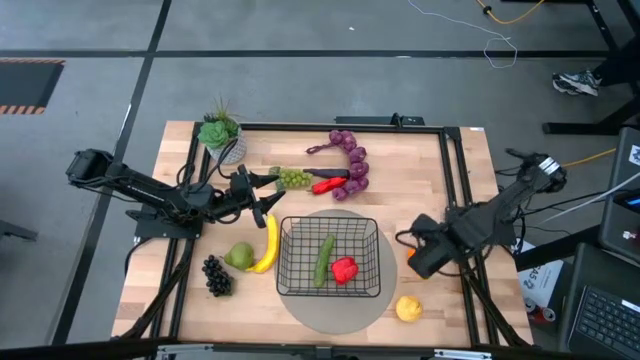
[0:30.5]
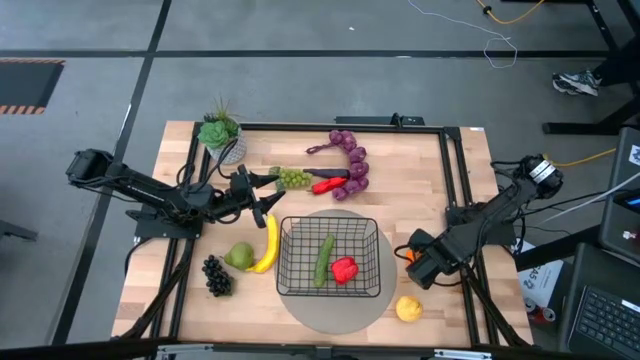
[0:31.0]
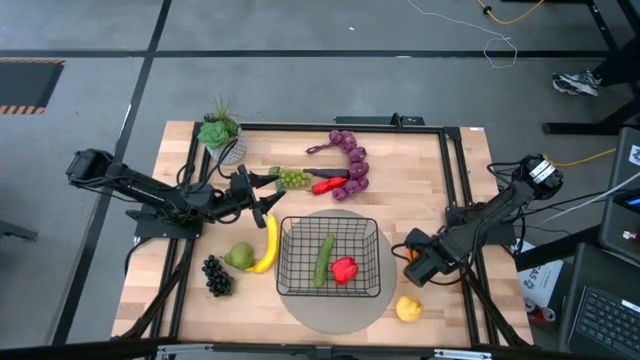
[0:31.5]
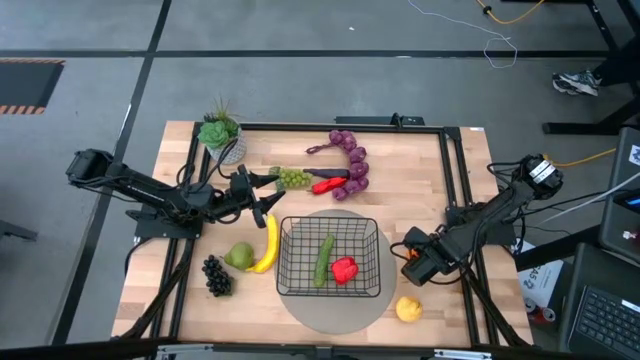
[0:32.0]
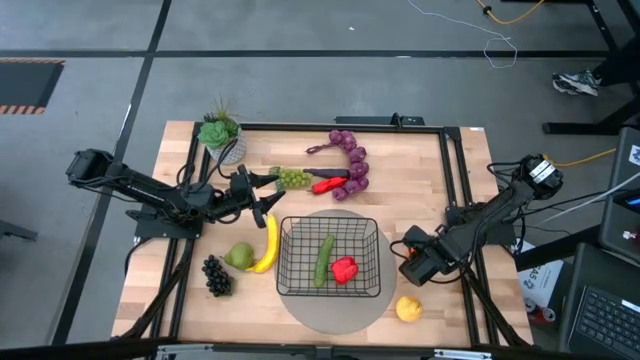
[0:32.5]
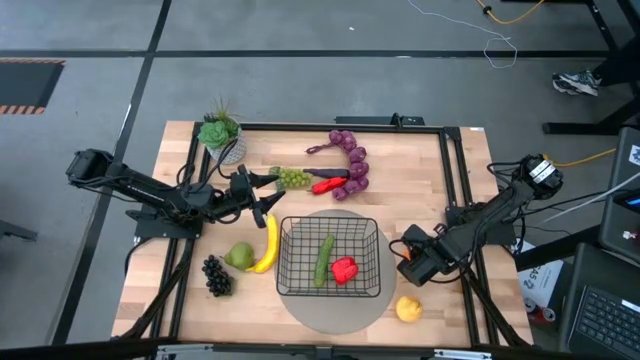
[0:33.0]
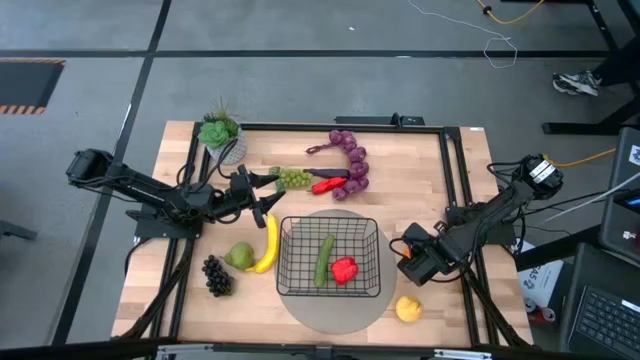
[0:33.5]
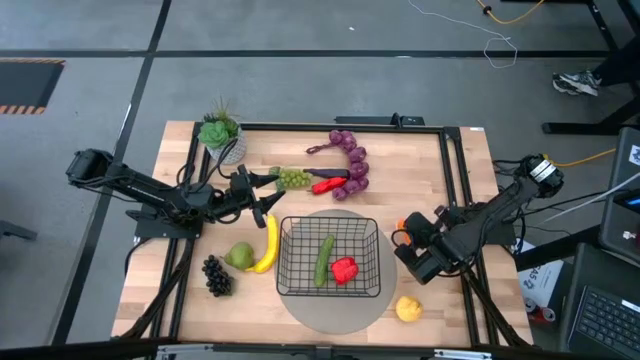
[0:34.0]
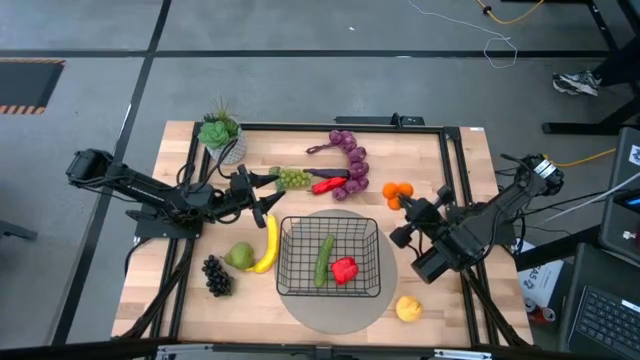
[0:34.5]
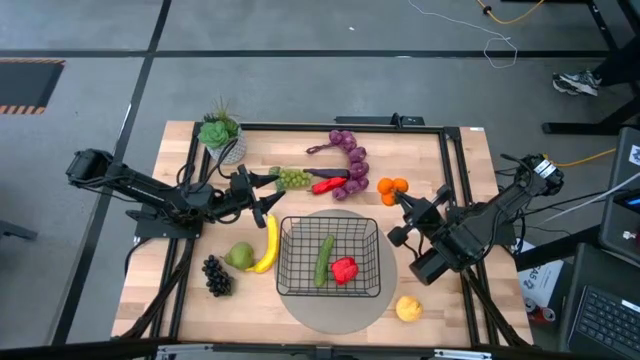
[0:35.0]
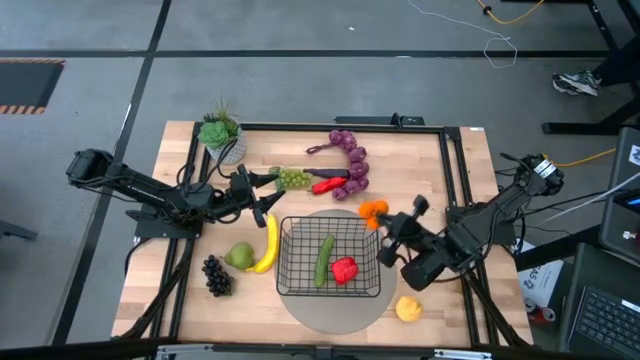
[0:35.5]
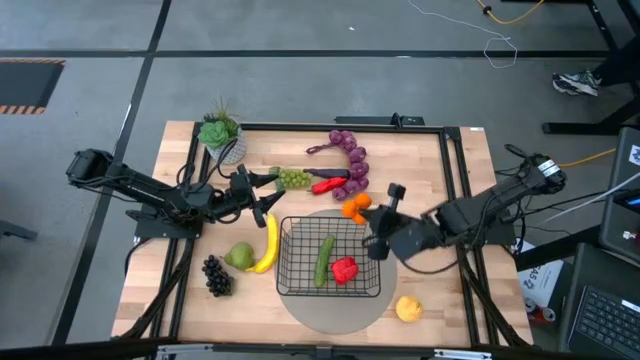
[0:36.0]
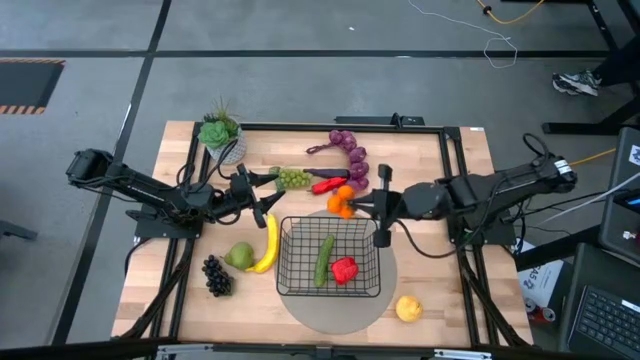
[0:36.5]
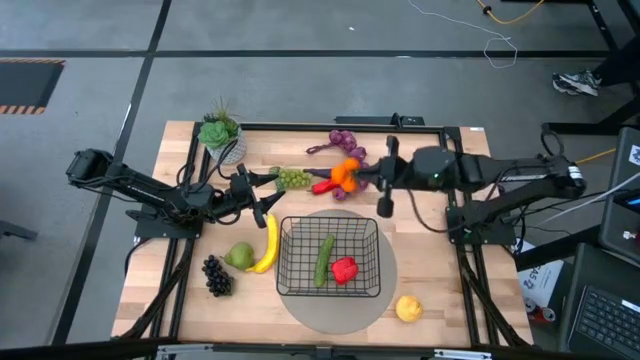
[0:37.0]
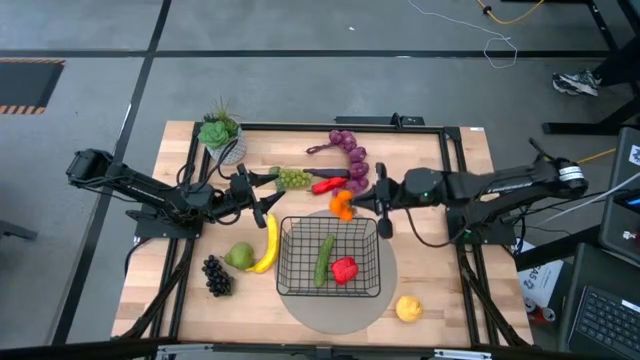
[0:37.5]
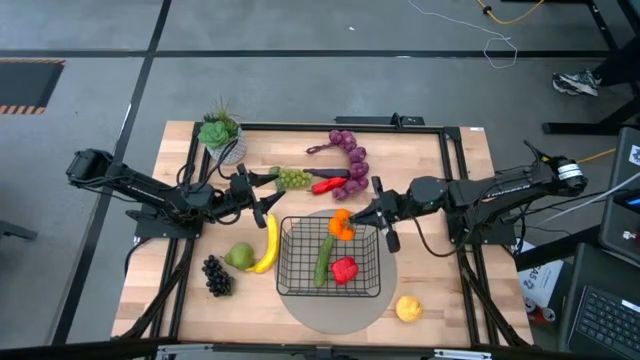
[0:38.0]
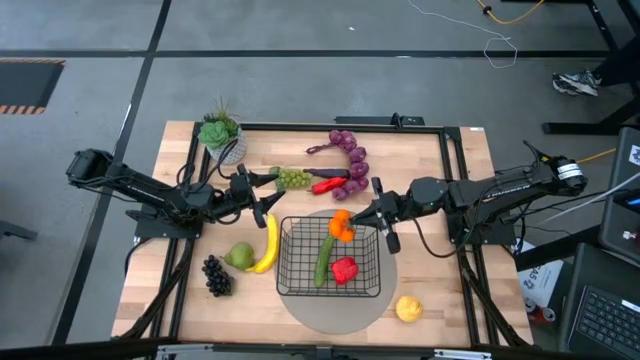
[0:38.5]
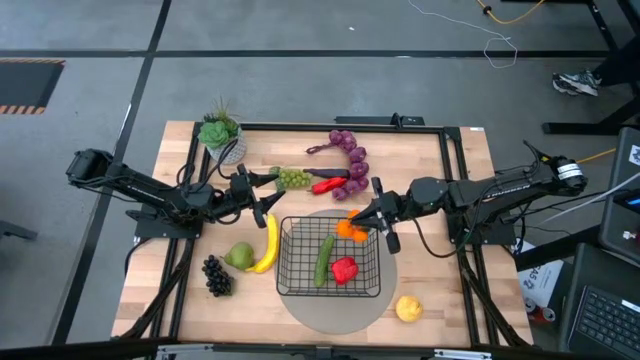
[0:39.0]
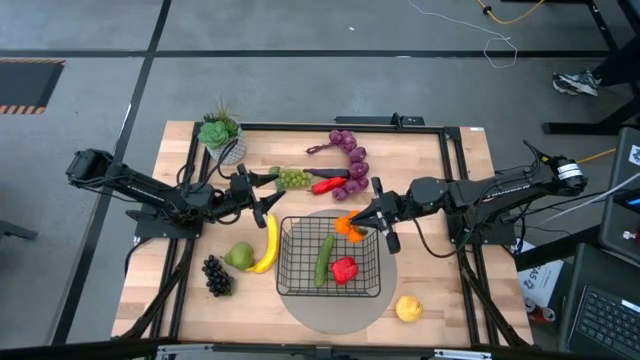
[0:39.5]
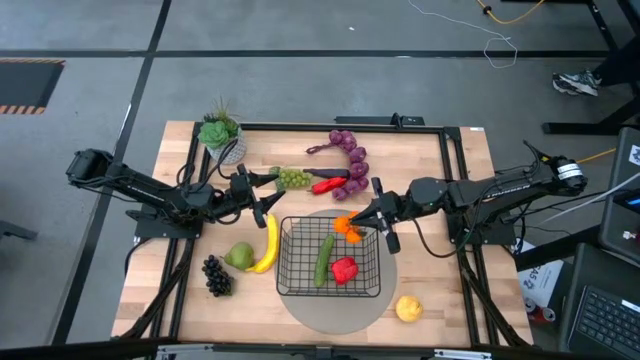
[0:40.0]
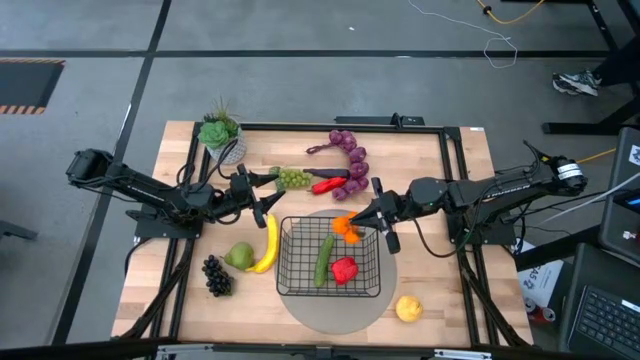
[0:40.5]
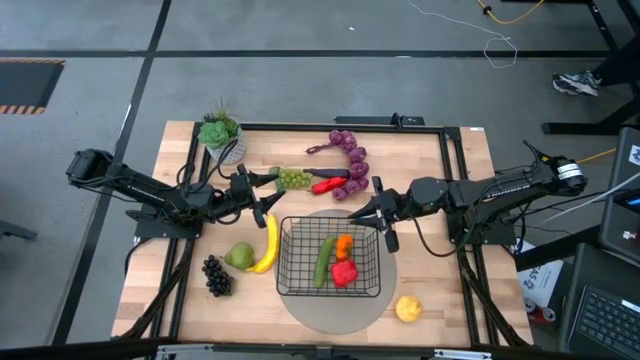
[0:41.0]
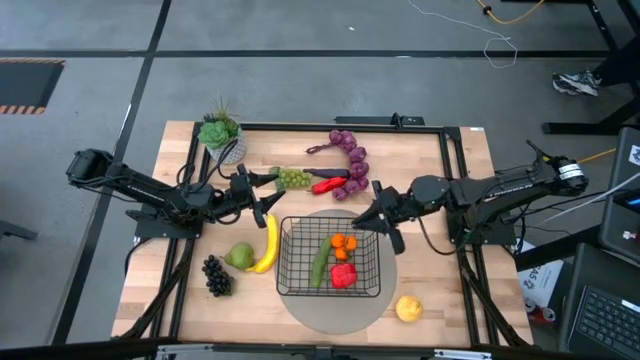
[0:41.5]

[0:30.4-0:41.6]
Task: Build produce basket
Put the orange tangerine into the wire basket

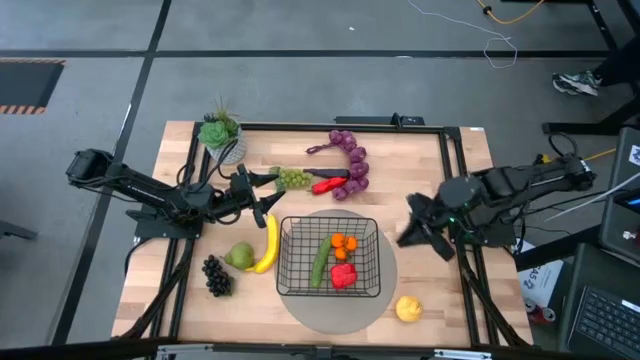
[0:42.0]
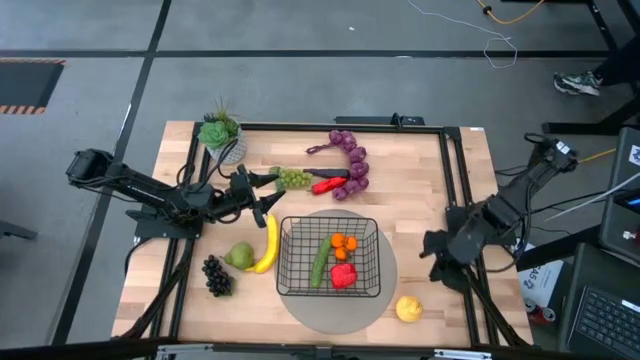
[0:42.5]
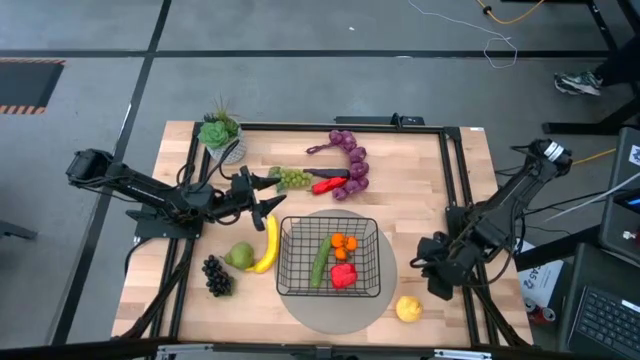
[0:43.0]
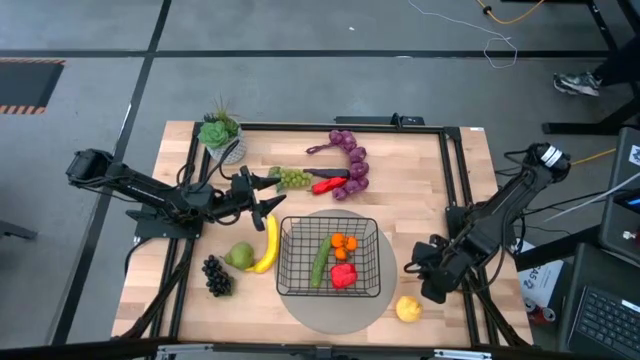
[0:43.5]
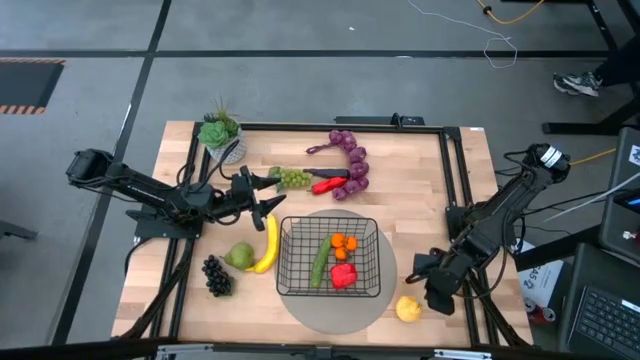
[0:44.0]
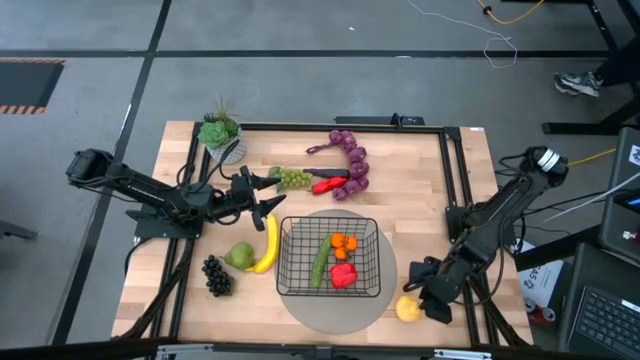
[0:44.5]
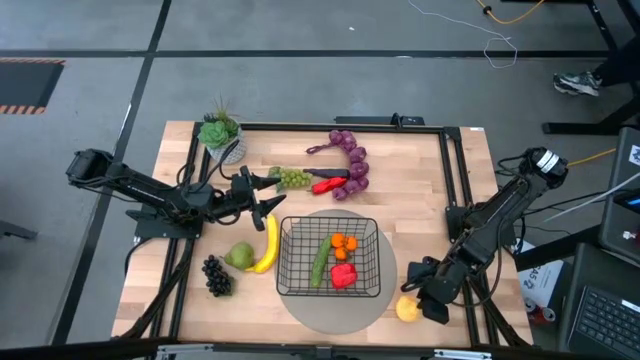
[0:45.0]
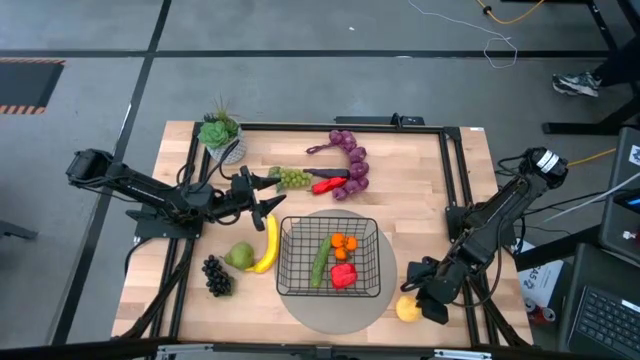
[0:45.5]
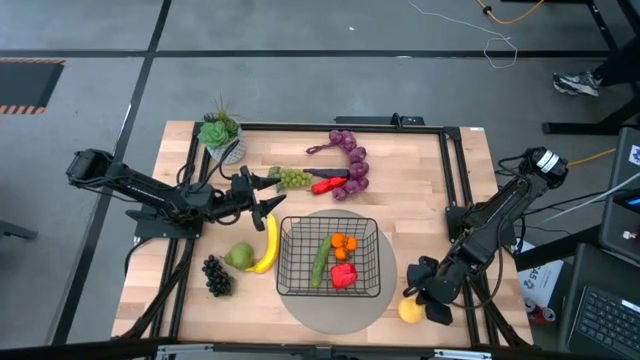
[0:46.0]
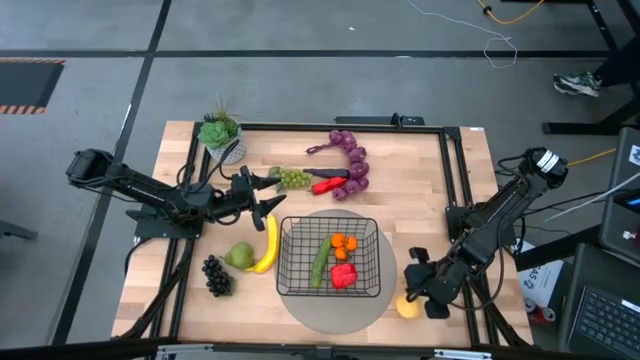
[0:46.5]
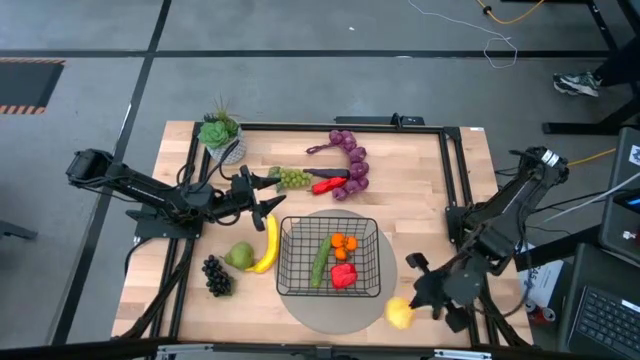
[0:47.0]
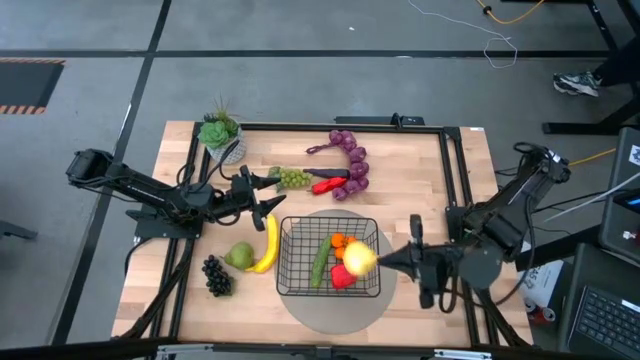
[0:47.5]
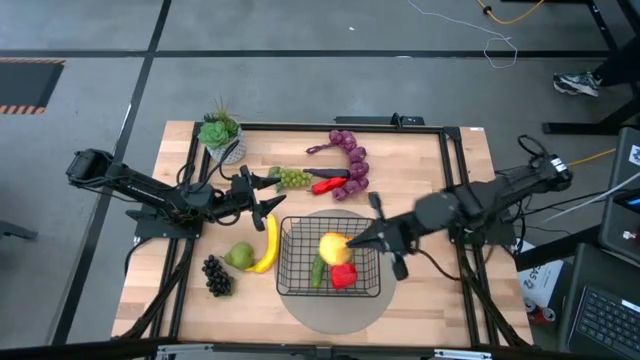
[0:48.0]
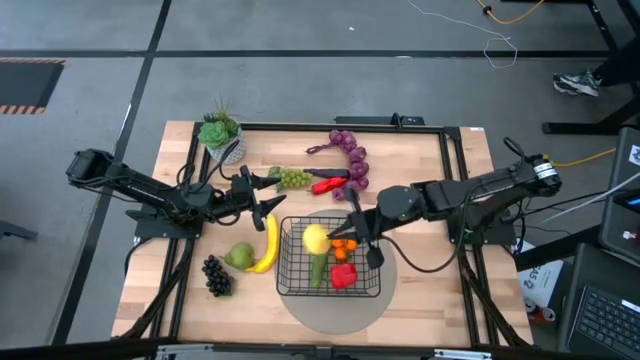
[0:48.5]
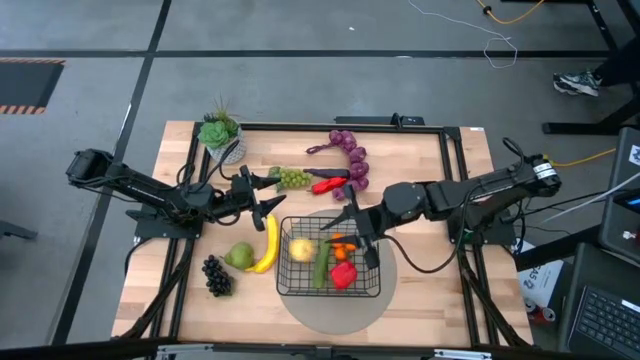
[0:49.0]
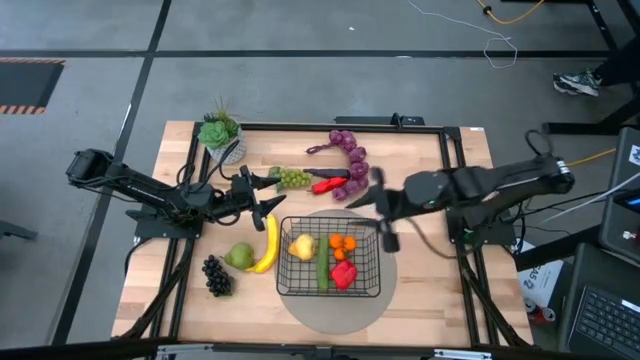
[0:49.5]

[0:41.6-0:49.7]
Put the yellow pear into the wire basket

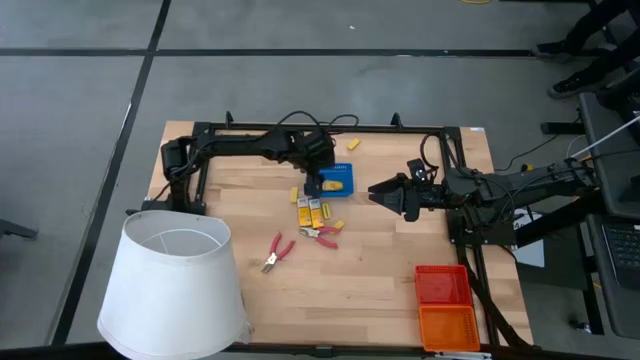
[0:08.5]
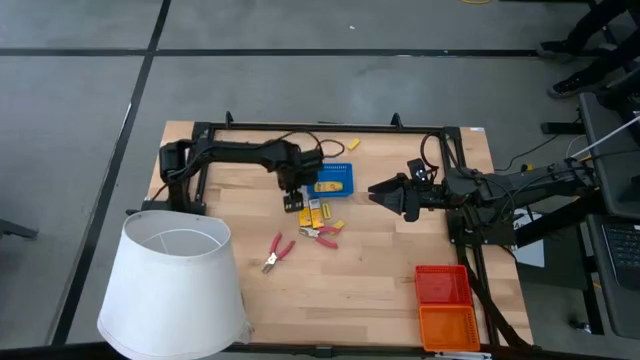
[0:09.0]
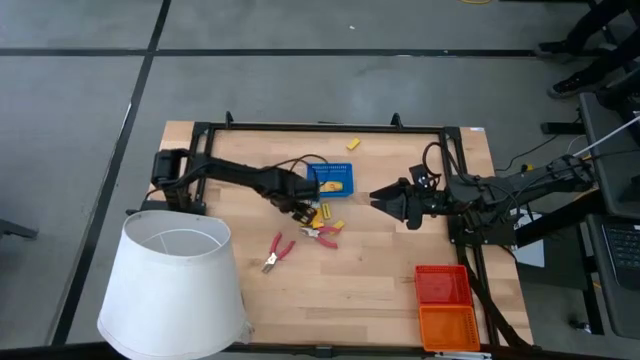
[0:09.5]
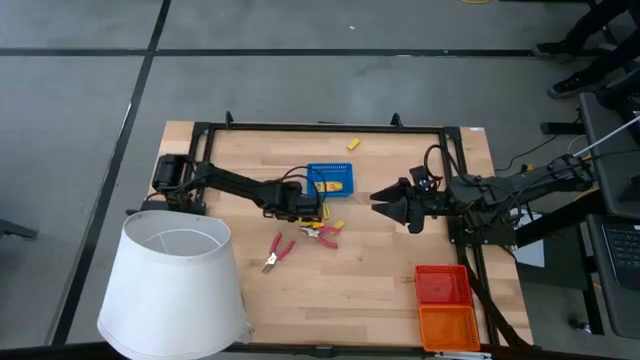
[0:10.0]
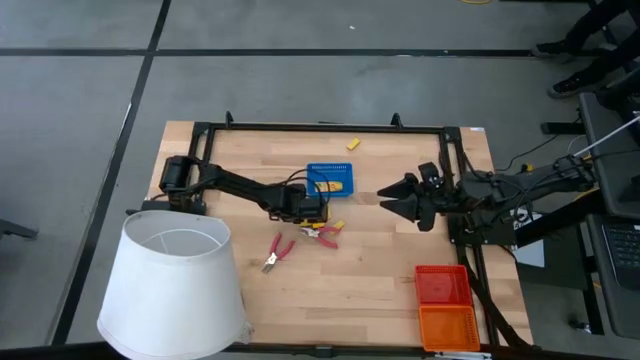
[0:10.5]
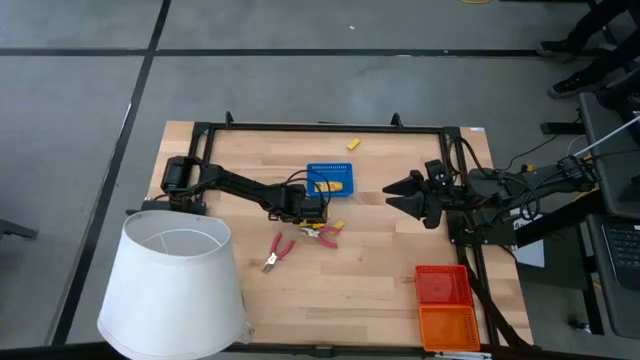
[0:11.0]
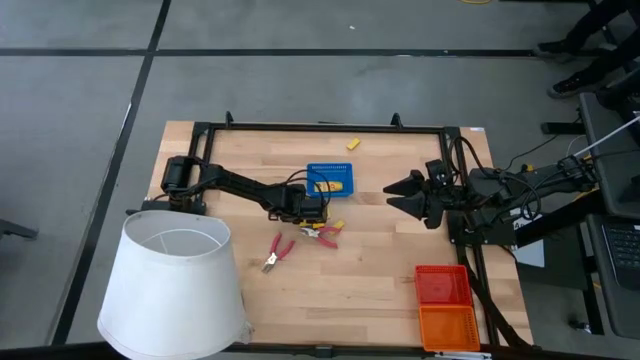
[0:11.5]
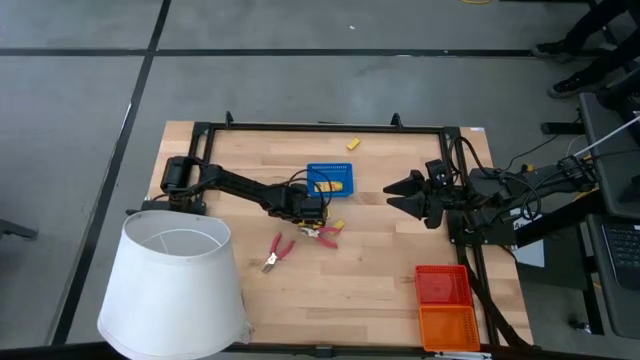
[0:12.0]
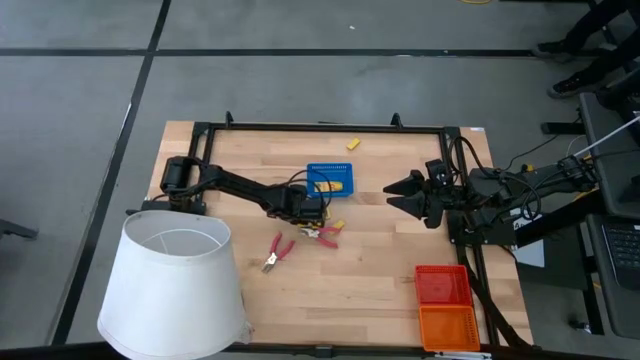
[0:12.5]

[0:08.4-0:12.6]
Task: Pick & Place School Supplies
Put the yellow crayon box into the blue bin
